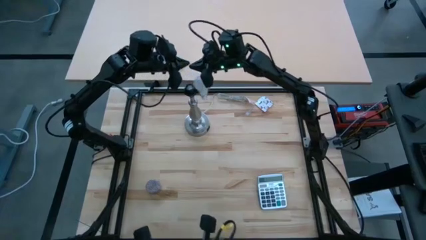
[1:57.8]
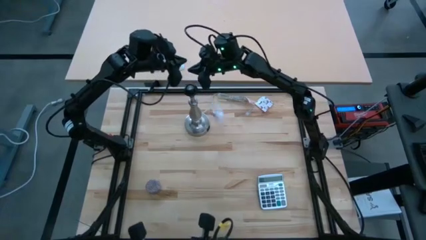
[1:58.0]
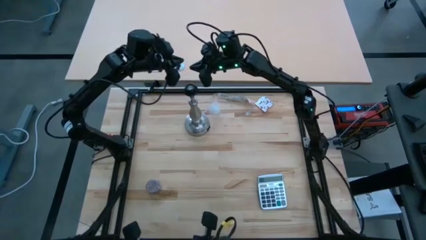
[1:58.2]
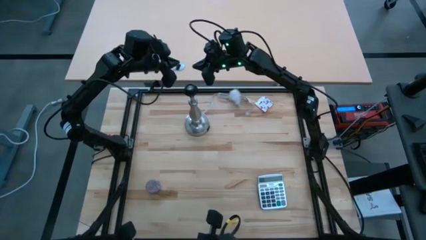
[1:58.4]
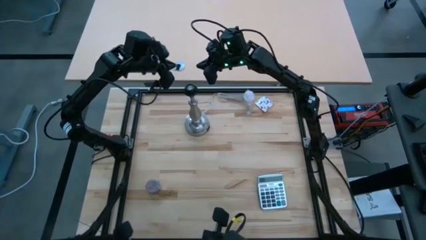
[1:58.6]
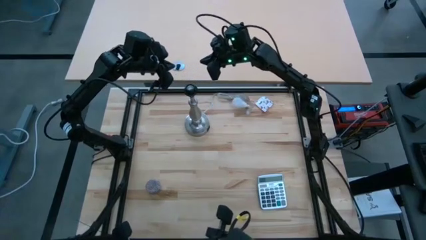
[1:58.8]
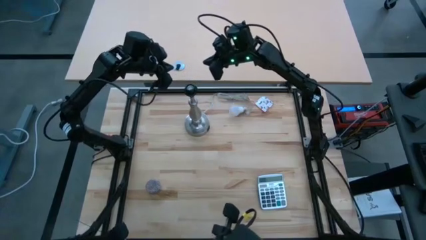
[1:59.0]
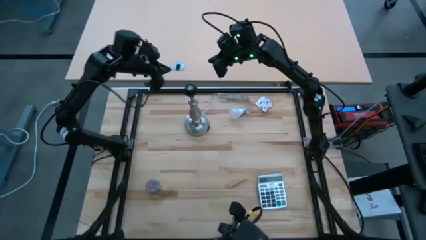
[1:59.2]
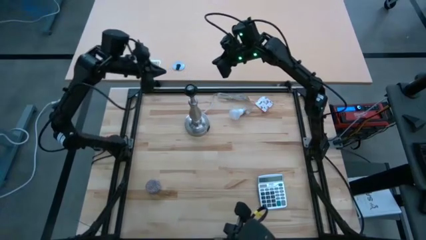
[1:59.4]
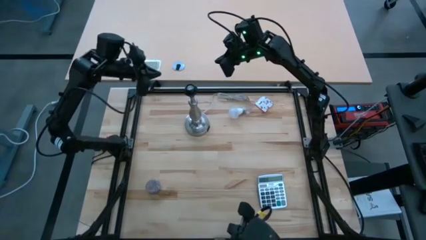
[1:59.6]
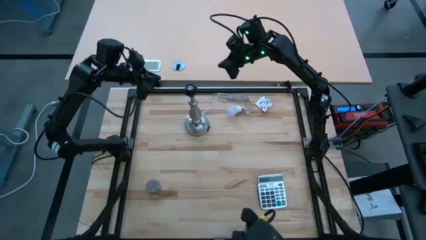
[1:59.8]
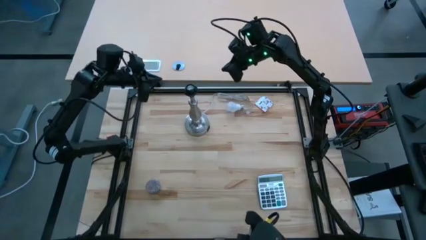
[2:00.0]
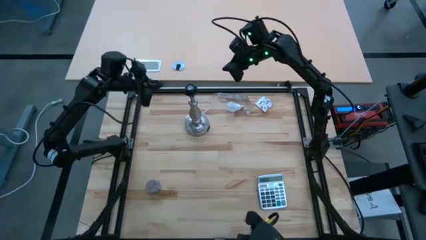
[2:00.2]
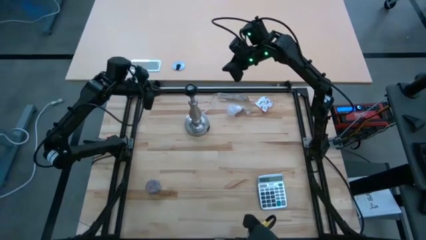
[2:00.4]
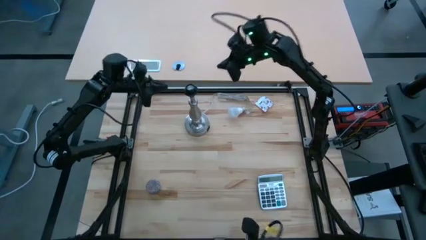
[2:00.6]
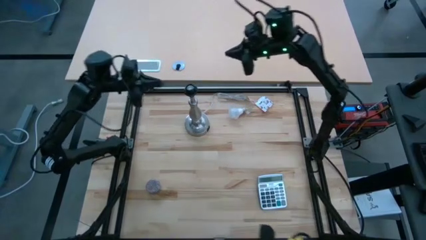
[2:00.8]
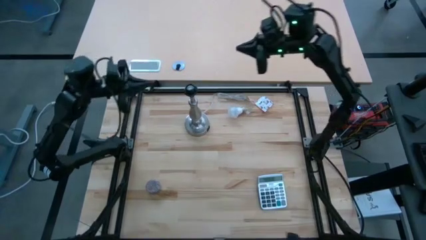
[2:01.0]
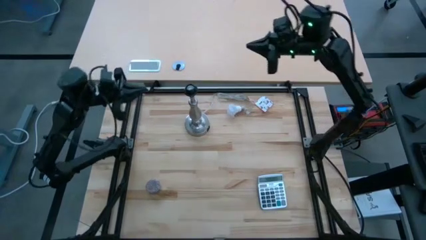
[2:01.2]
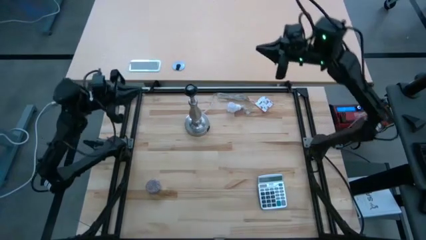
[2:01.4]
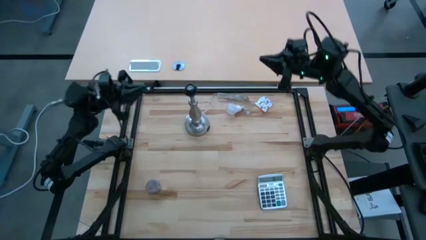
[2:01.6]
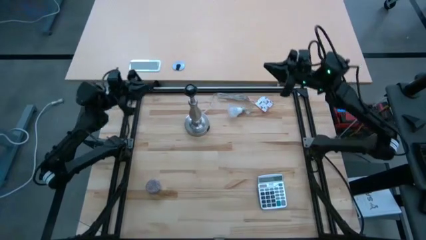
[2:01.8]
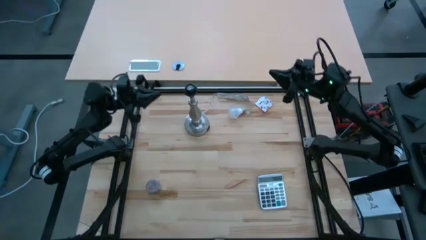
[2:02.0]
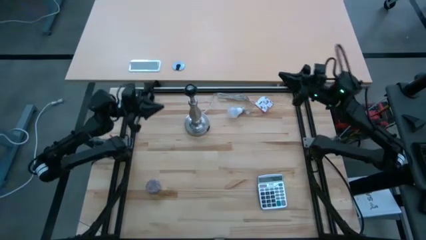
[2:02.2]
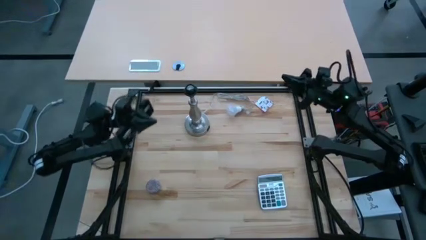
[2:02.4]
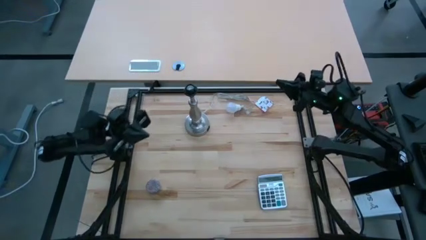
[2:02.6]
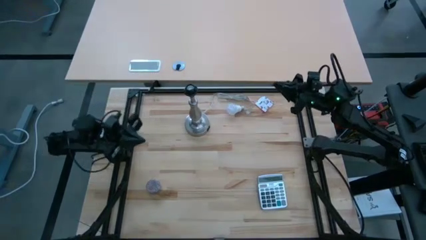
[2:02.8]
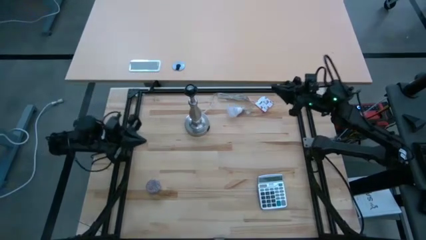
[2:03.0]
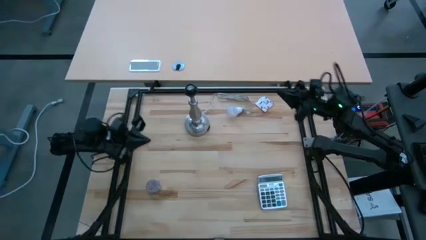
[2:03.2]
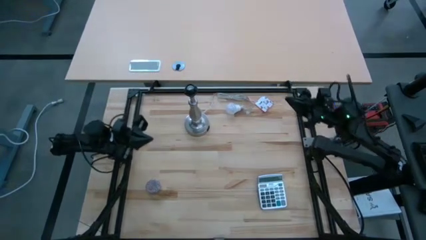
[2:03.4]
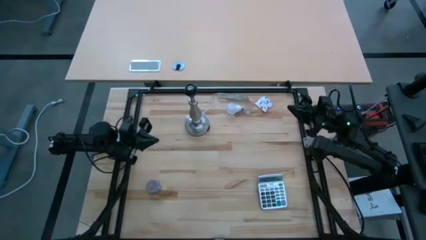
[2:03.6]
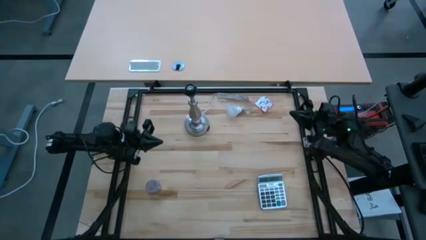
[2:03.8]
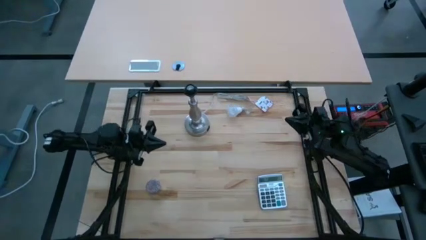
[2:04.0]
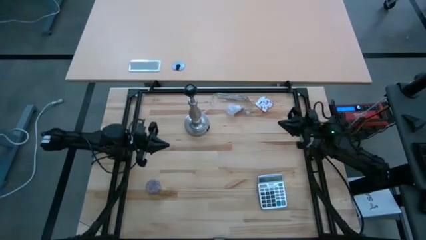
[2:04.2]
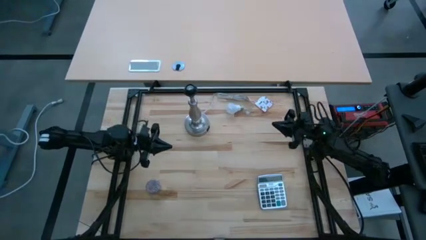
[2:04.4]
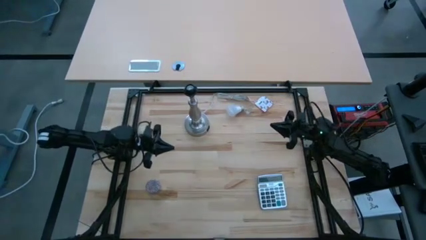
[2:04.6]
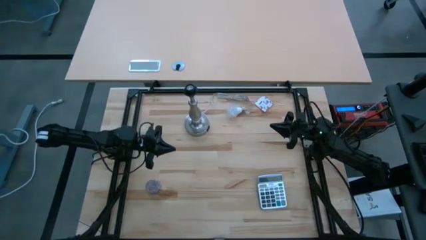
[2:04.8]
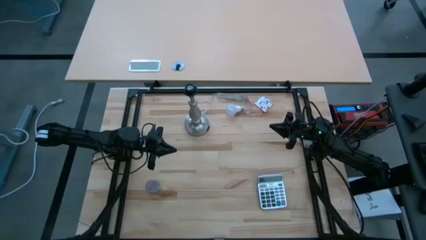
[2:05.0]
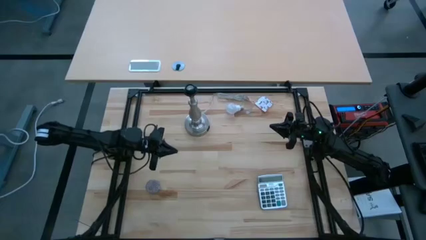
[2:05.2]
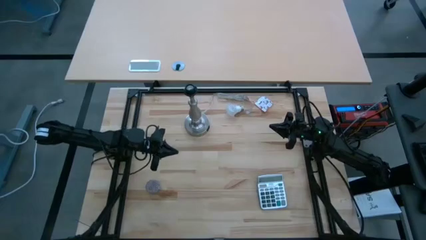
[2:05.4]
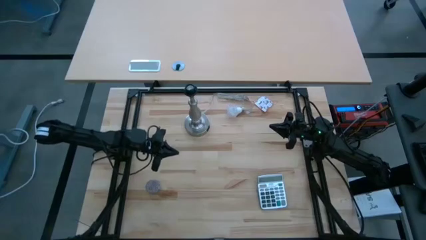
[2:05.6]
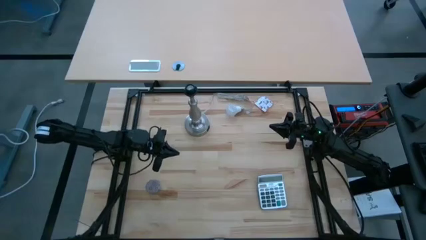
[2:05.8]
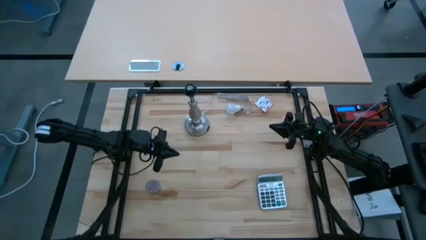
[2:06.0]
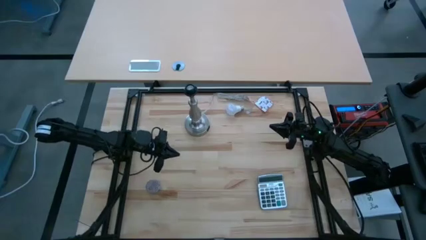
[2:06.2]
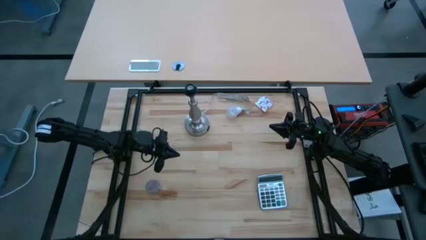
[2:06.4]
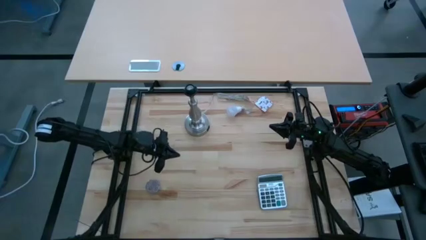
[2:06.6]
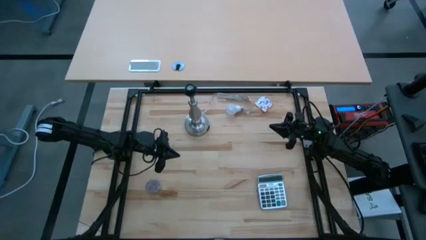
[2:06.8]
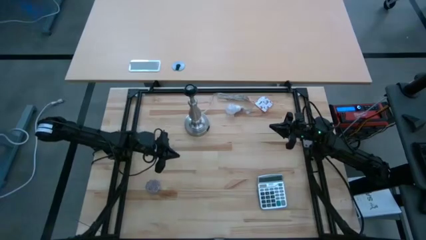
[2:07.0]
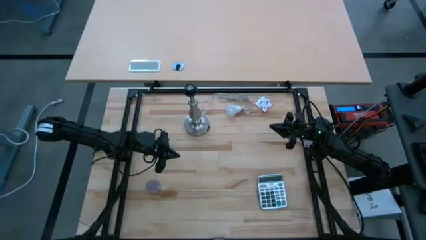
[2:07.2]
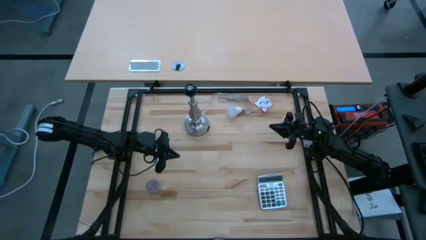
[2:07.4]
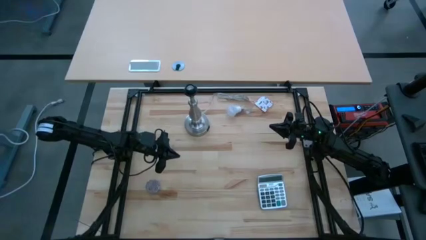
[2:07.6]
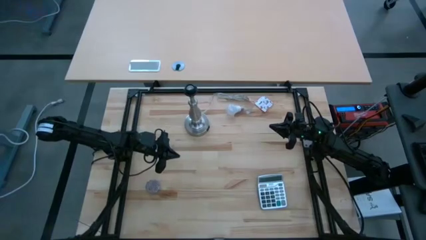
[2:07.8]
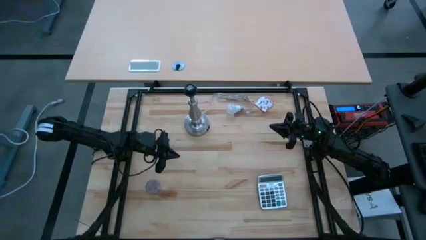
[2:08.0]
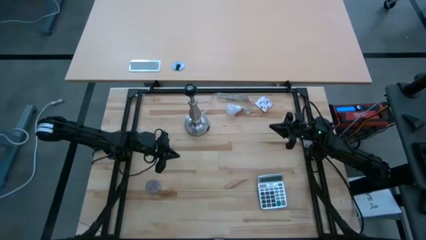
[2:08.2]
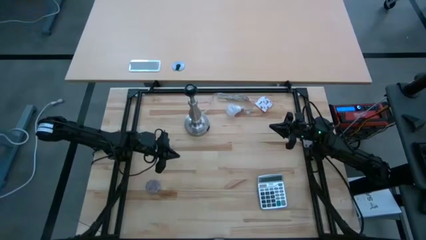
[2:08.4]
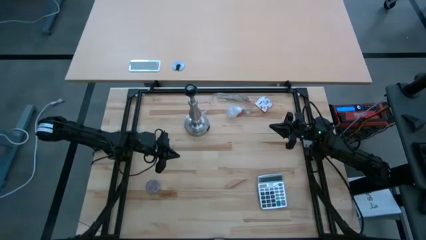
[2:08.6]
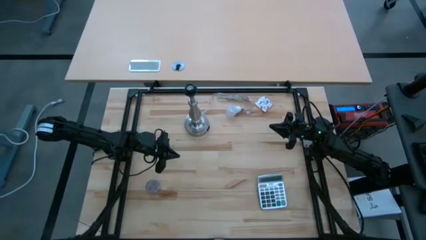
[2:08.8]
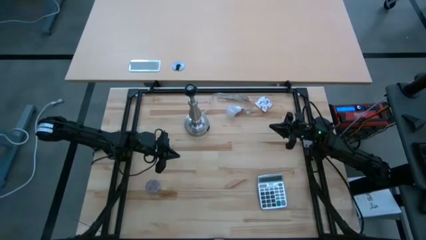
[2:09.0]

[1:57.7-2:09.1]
Task: Screw lightbulb
Return to Home Position

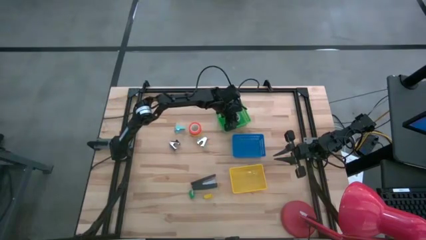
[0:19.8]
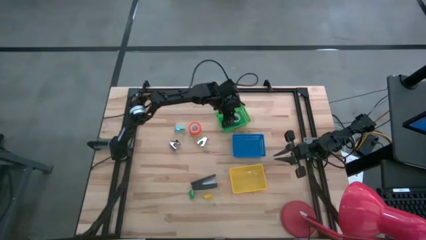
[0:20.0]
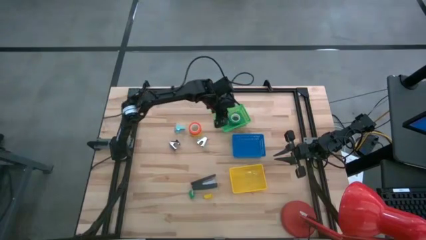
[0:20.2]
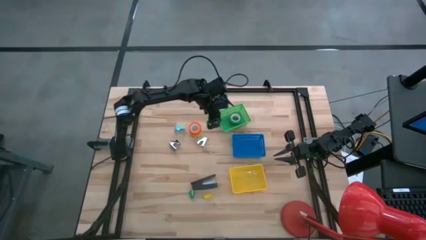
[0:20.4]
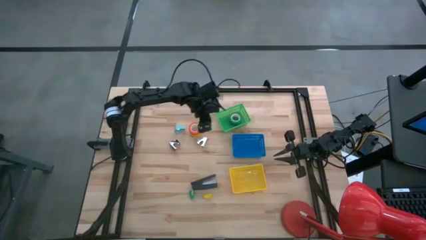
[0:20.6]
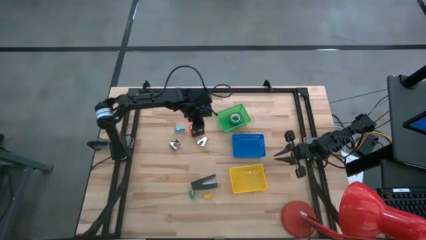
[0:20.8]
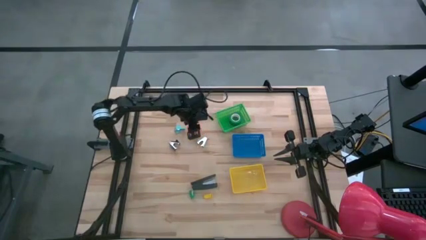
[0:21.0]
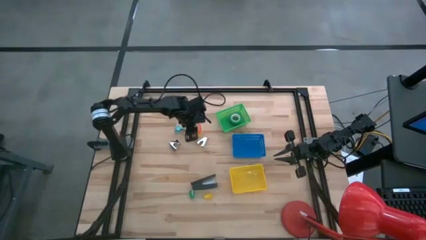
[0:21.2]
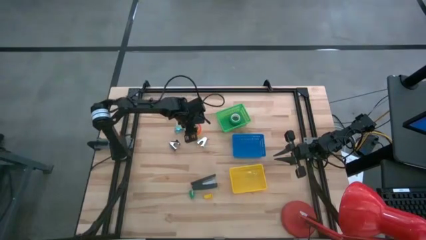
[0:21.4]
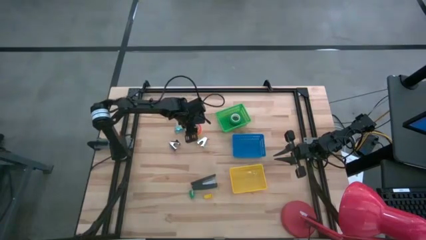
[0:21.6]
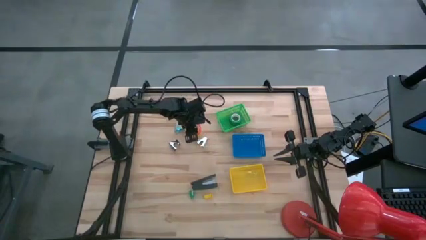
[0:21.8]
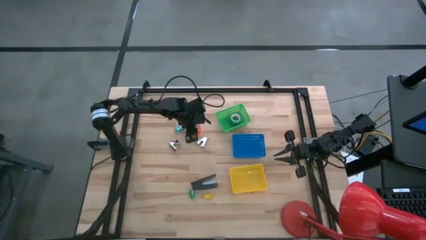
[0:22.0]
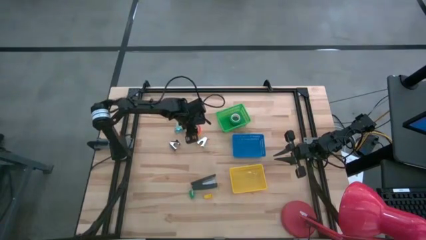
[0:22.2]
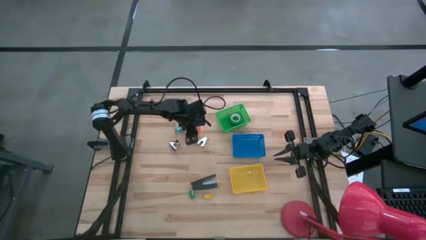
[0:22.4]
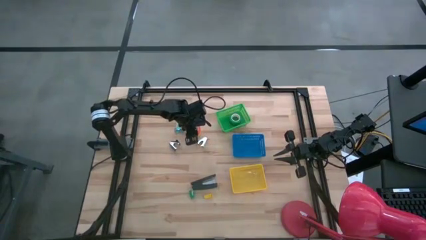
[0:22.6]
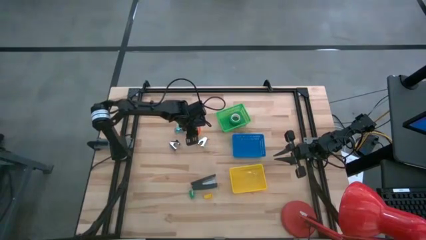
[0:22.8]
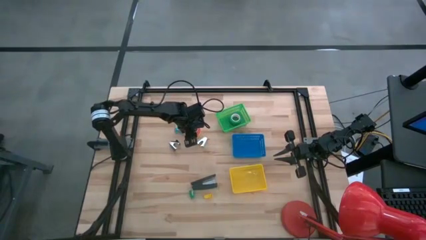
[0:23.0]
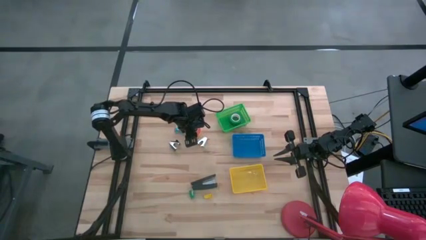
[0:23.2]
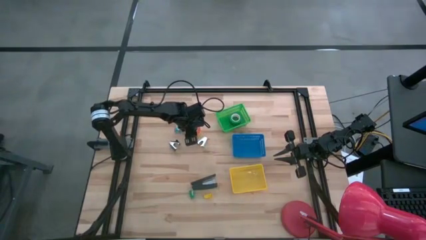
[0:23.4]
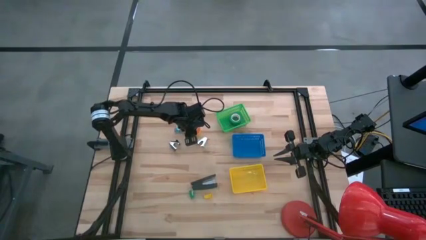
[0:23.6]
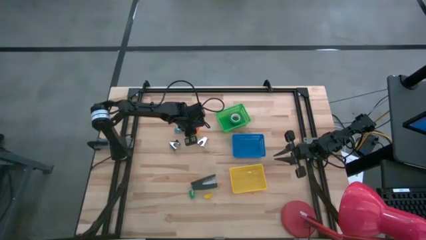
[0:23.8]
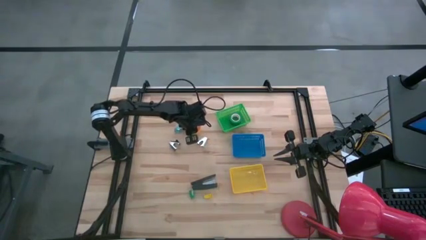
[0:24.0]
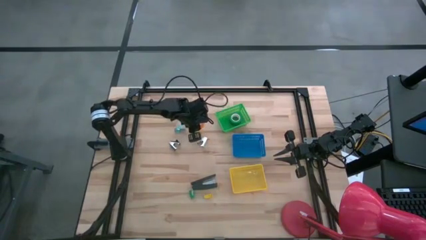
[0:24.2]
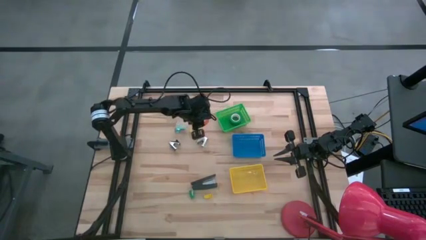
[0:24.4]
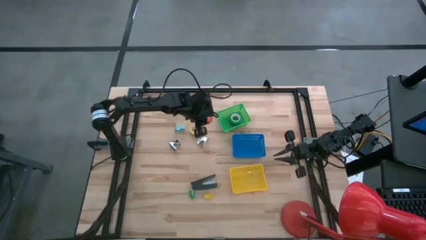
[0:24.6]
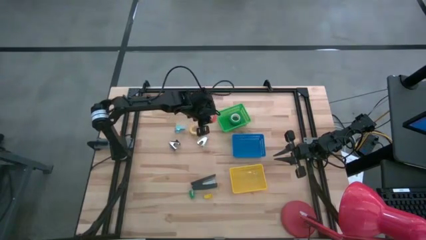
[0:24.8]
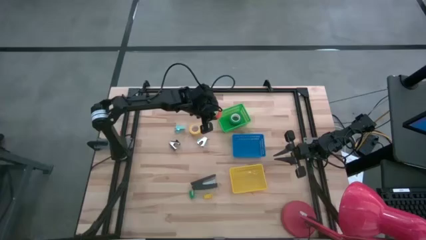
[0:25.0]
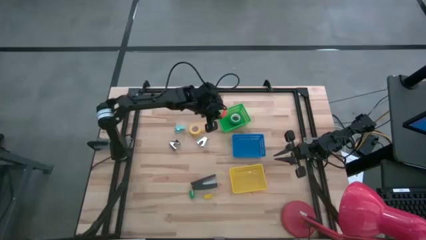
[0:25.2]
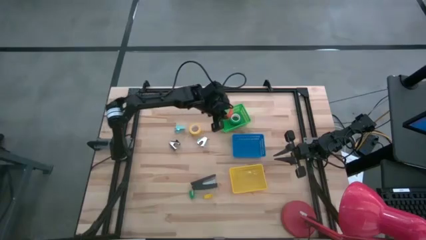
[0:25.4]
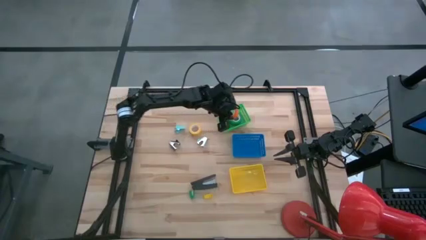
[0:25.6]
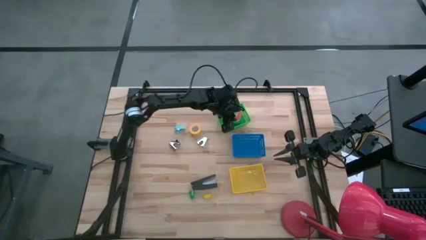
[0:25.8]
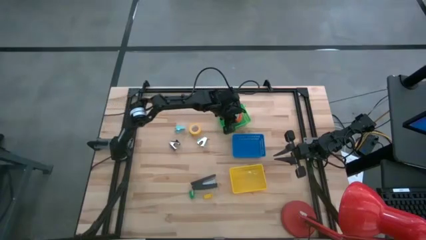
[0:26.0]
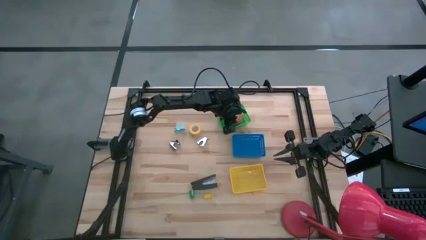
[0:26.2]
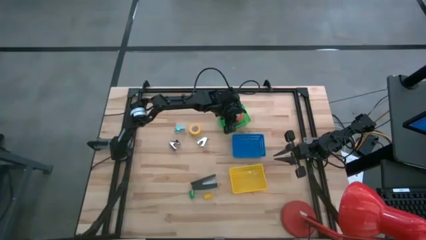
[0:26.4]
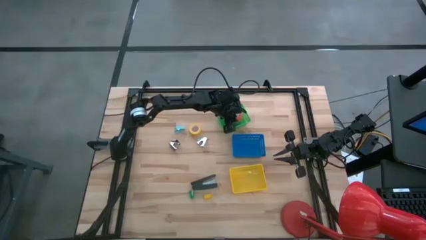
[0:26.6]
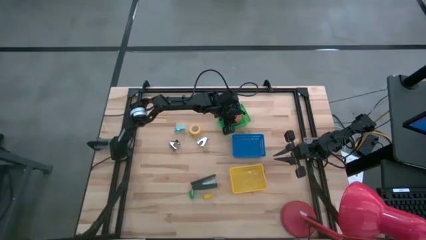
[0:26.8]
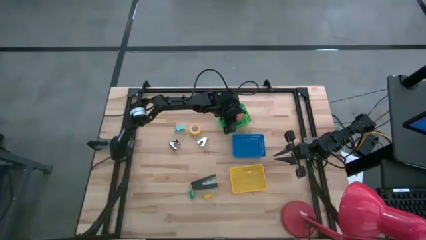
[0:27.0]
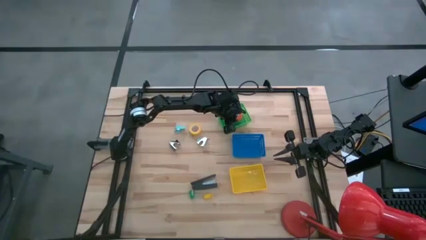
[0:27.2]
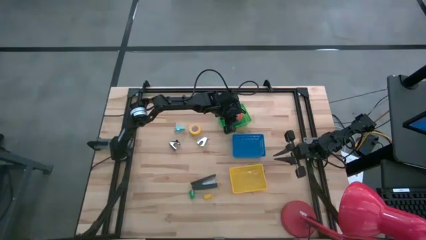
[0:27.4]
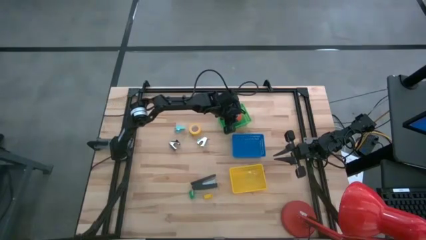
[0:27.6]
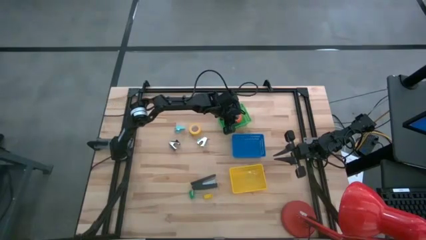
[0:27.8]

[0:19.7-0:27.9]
Task: Pick and place Stapler, Stapler remover, tape
Put the orange tape into the green bin
